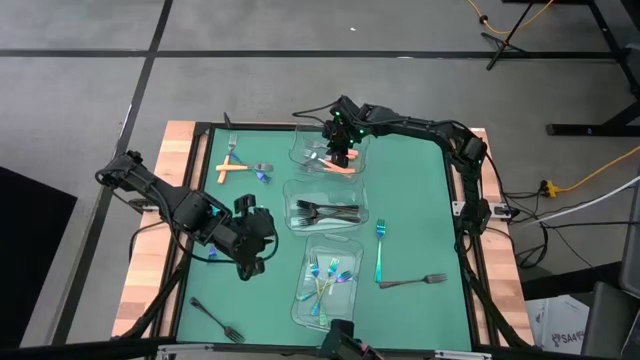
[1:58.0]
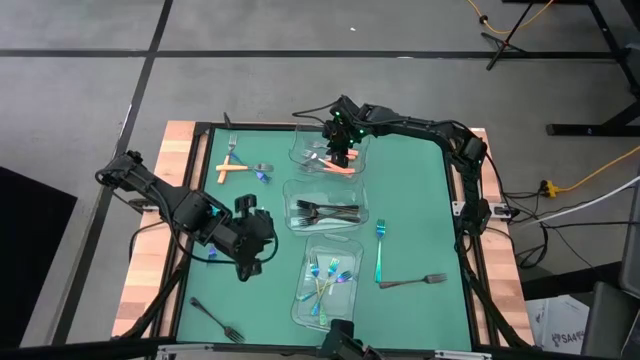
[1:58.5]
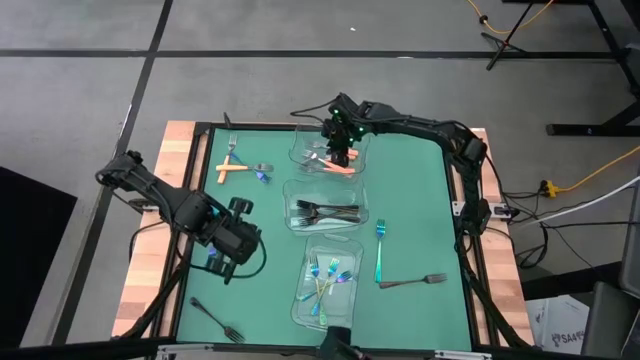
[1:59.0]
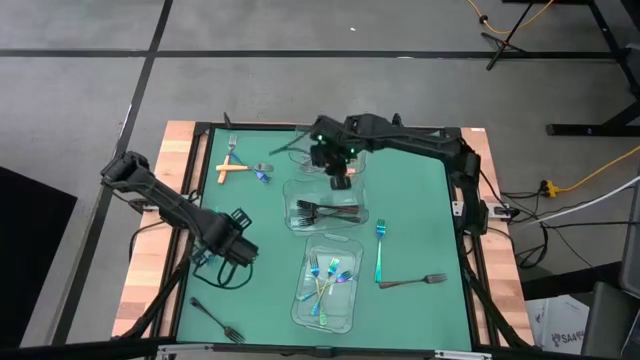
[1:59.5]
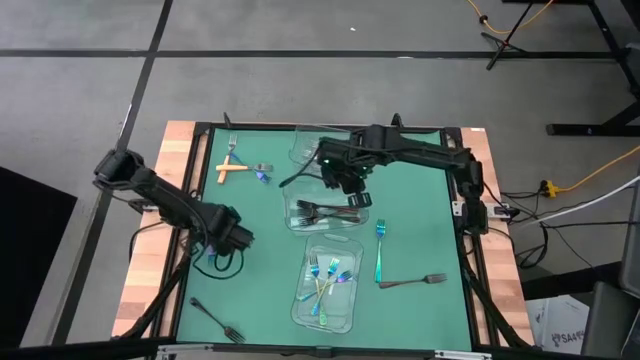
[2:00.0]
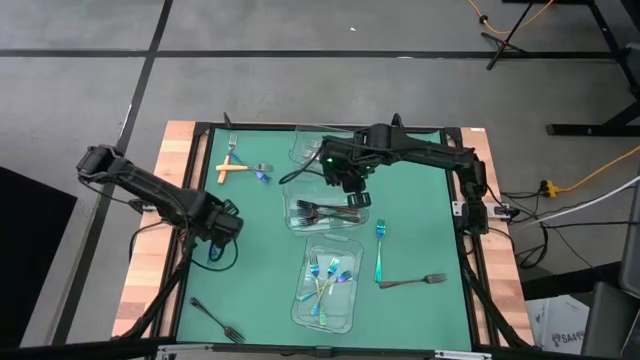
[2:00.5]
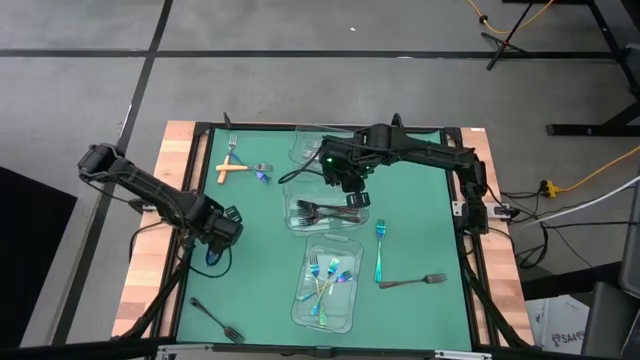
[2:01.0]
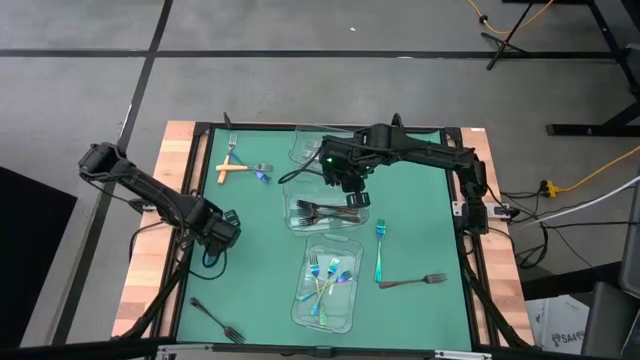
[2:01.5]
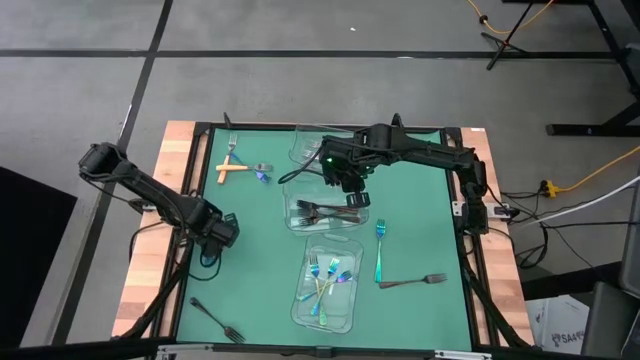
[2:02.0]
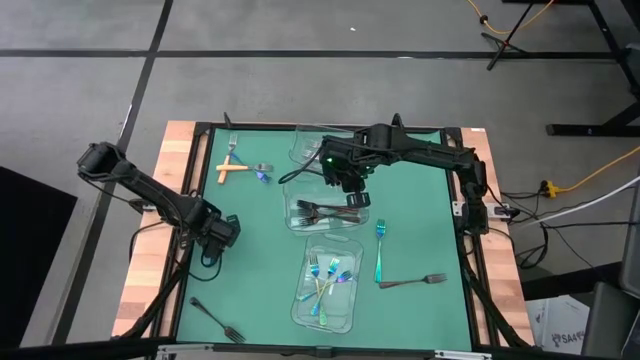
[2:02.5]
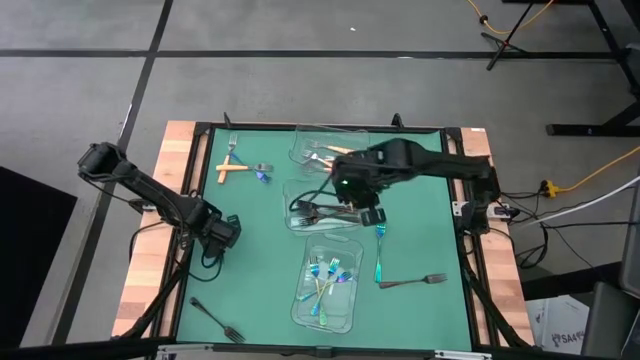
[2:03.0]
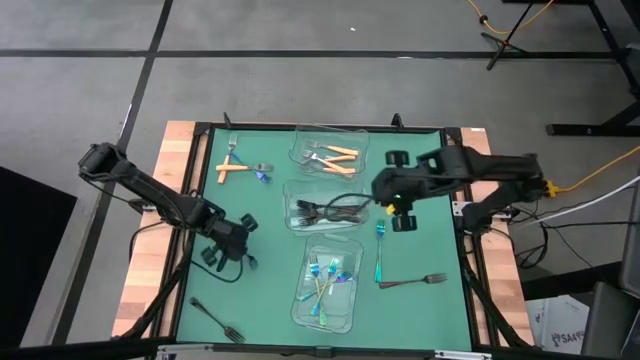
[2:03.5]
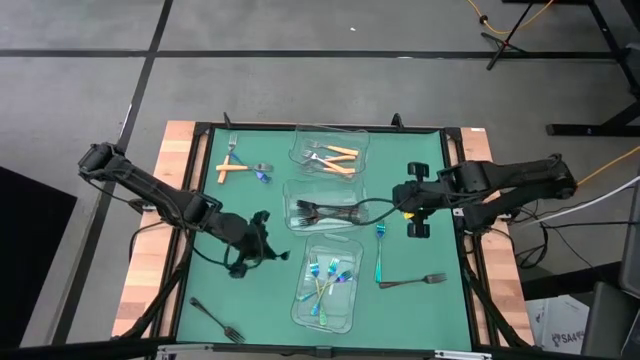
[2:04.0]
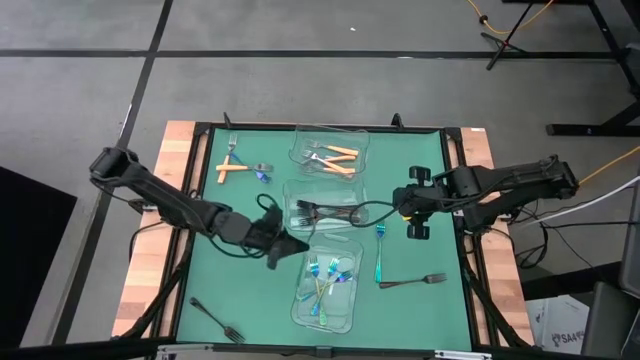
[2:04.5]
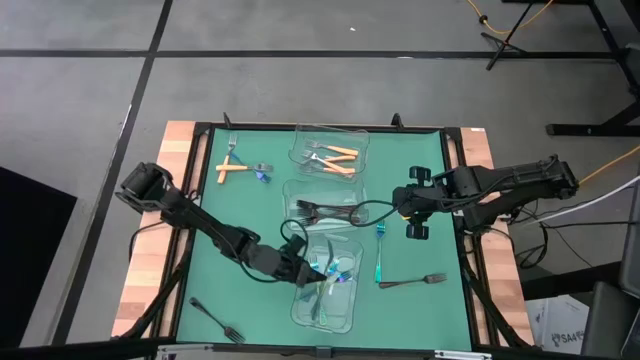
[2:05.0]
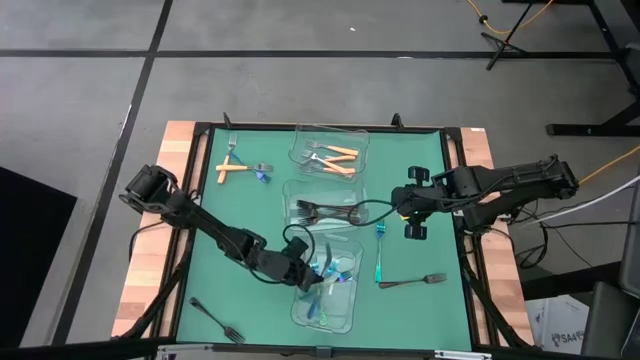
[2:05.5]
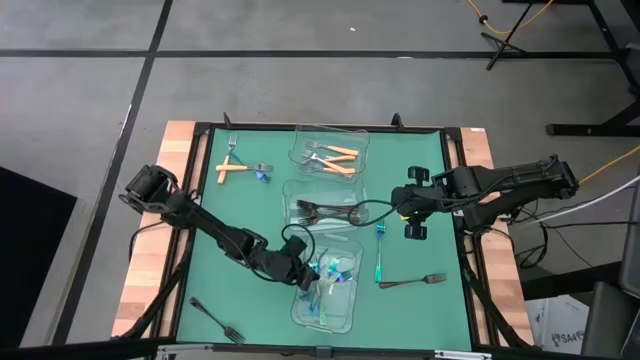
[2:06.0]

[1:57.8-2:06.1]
Task: Sort silverware by color (type)
Put the blue fork into the bottom transparent bin

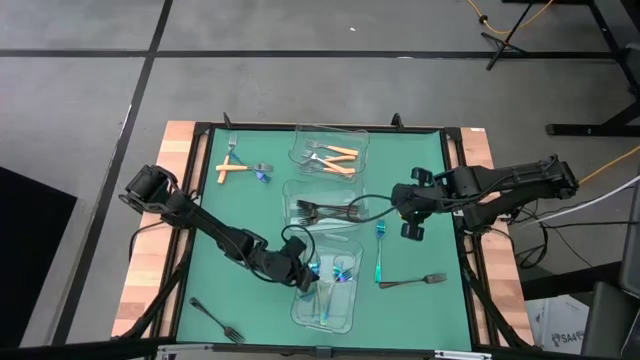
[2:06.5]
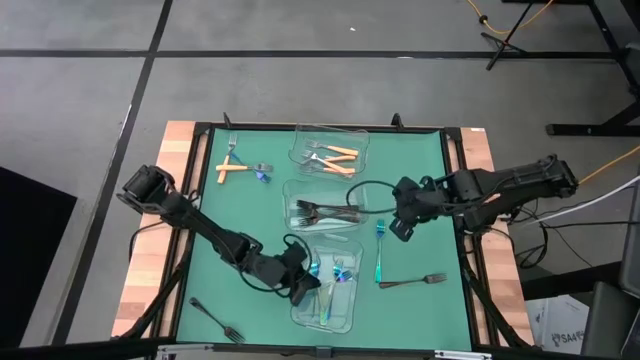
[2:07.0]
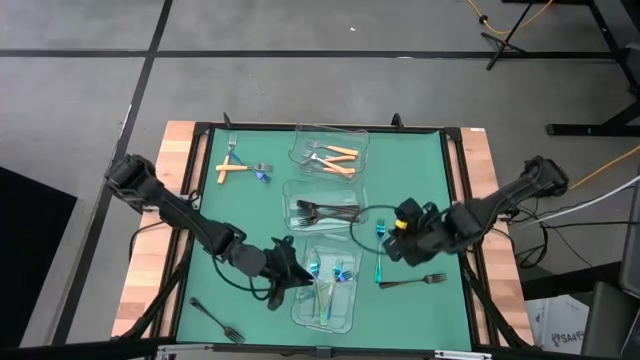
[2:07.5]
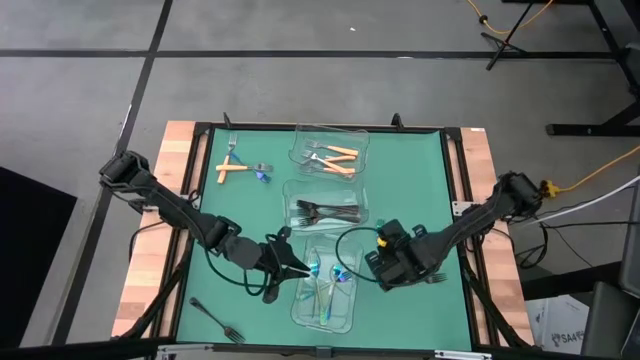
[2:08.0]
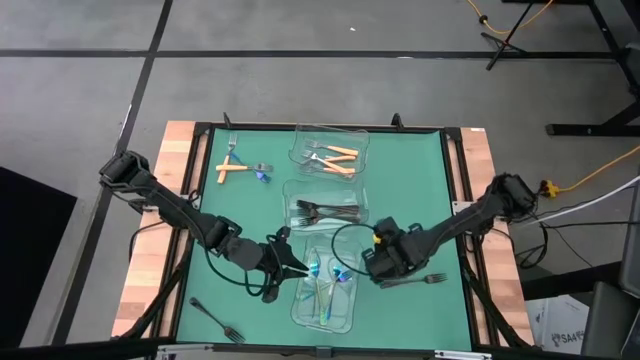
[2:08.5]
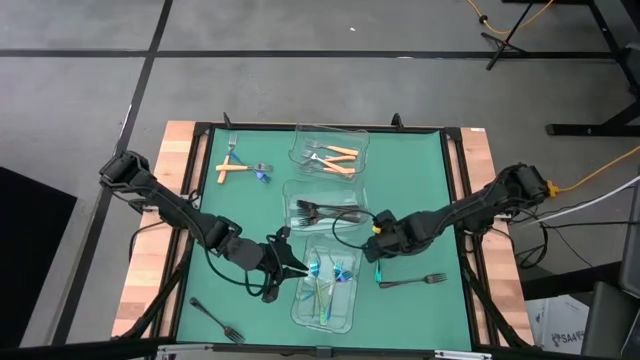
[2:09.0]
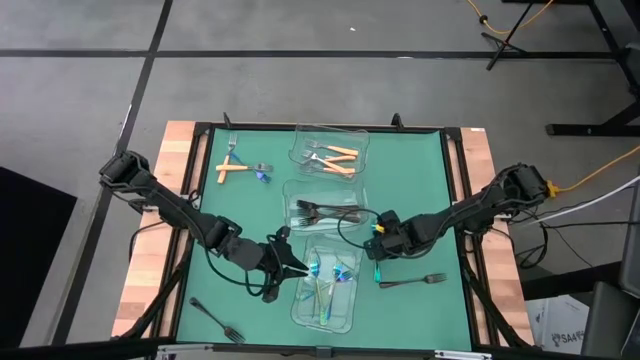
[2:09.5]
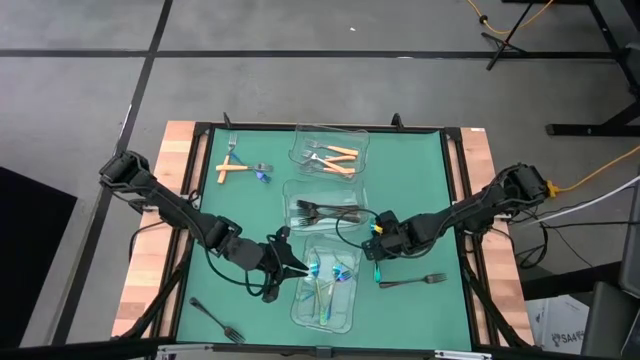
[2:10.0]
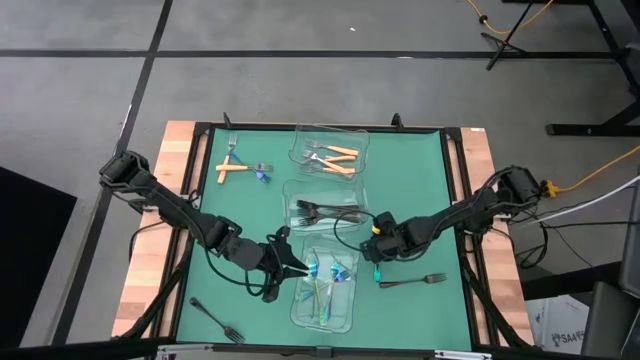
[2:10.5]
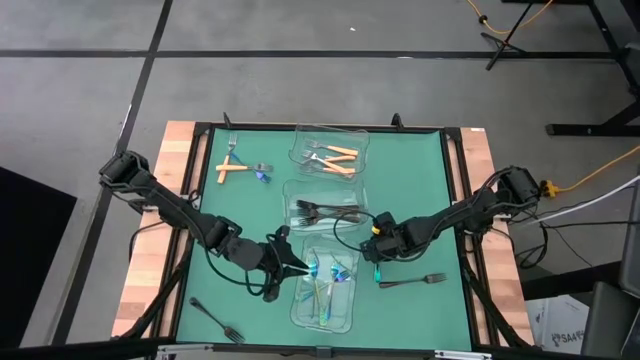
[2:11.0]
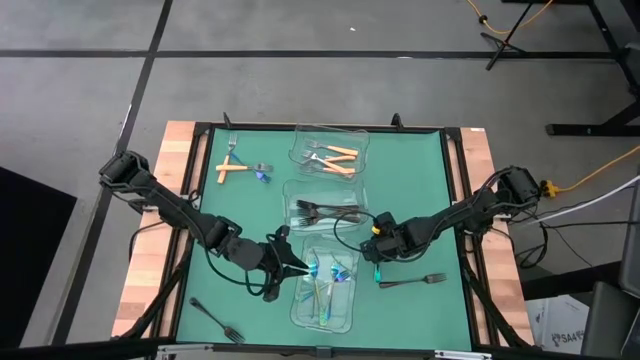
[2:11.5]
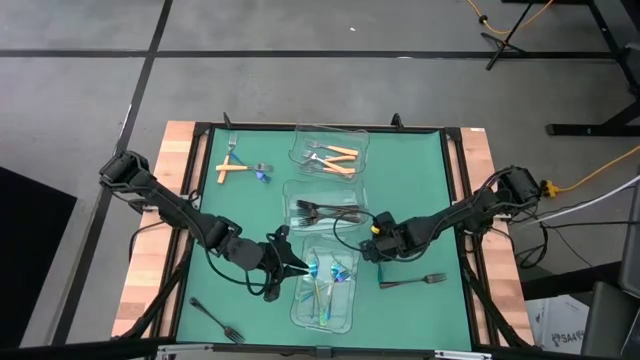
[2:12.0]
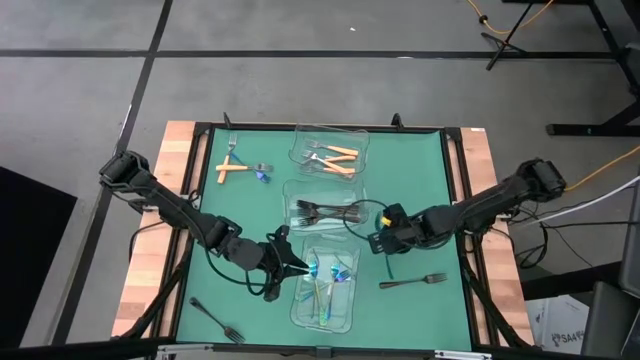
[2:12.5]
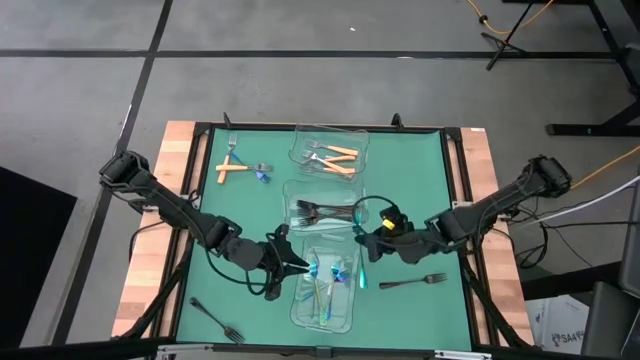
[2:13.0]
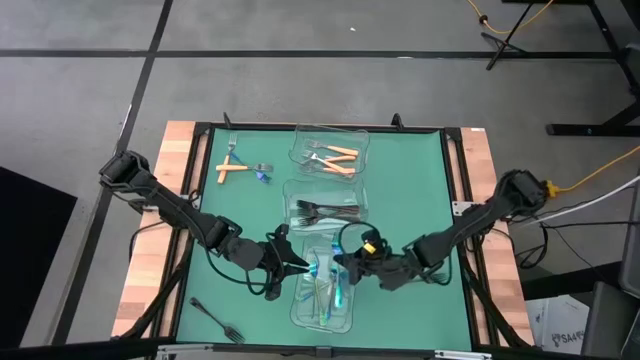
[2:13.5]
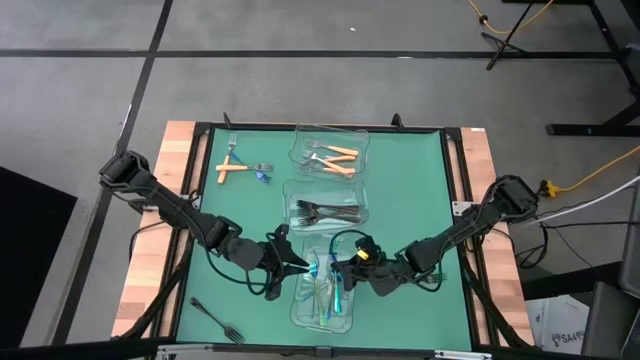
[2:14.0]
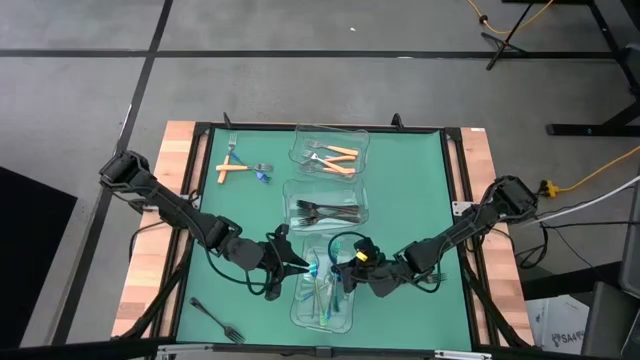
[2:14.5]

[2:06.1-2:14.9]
Put the blue fork into the bottom transparent bin

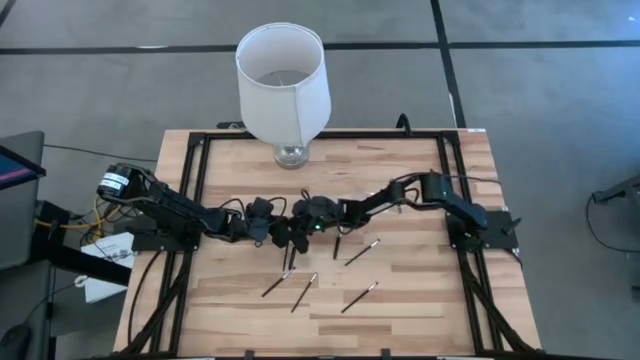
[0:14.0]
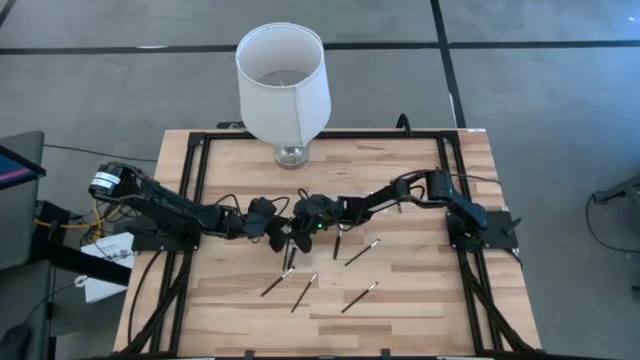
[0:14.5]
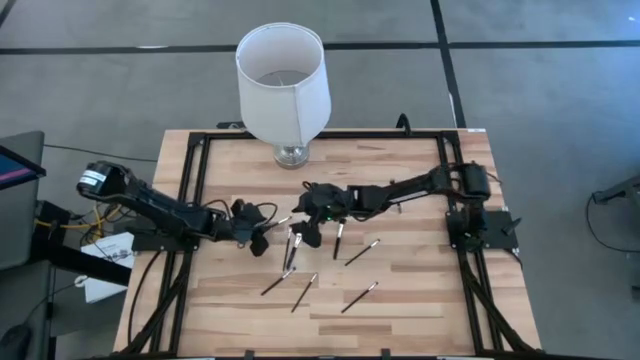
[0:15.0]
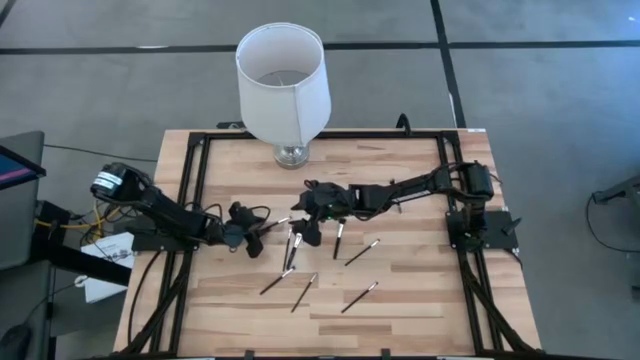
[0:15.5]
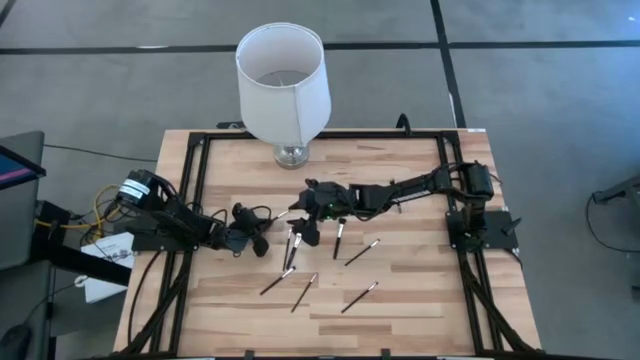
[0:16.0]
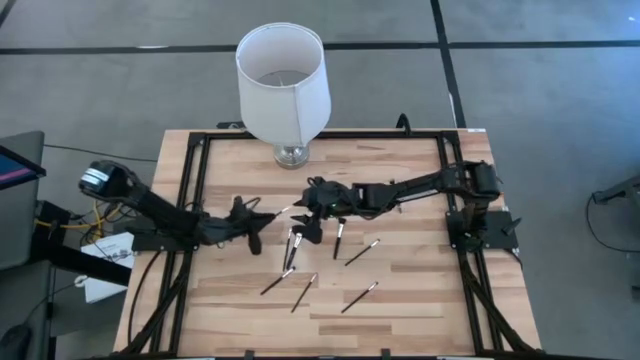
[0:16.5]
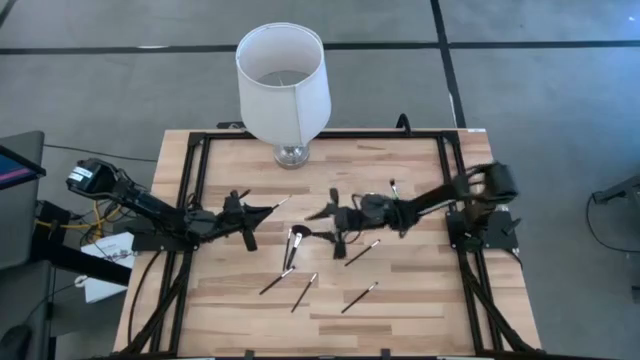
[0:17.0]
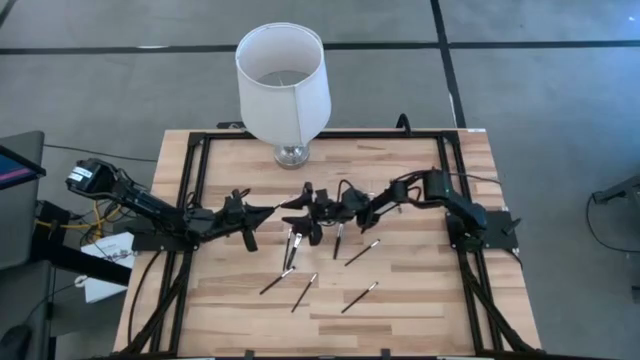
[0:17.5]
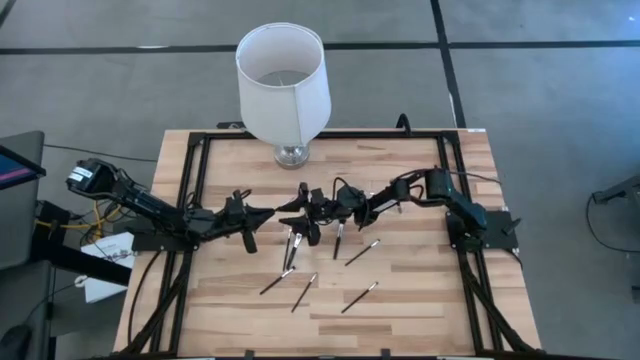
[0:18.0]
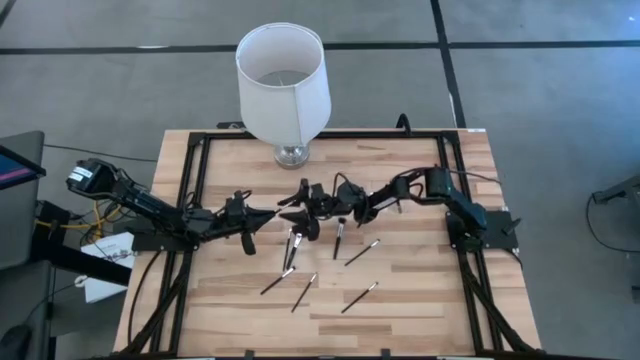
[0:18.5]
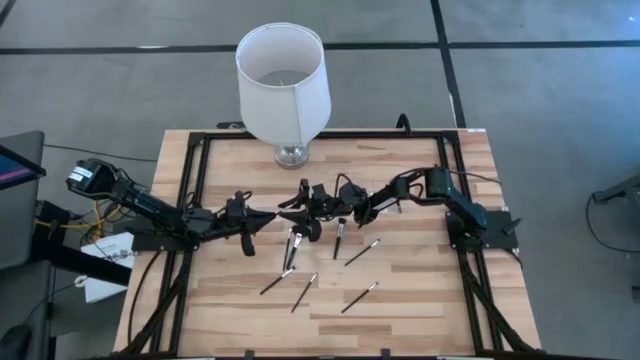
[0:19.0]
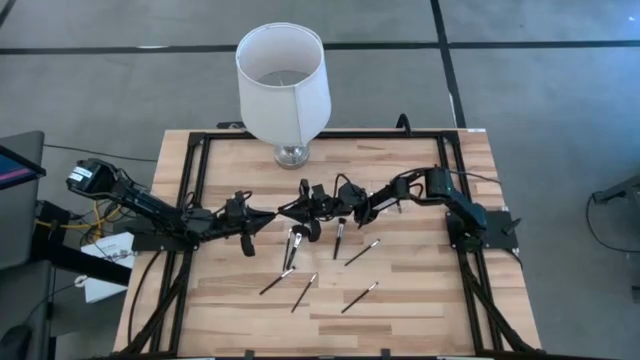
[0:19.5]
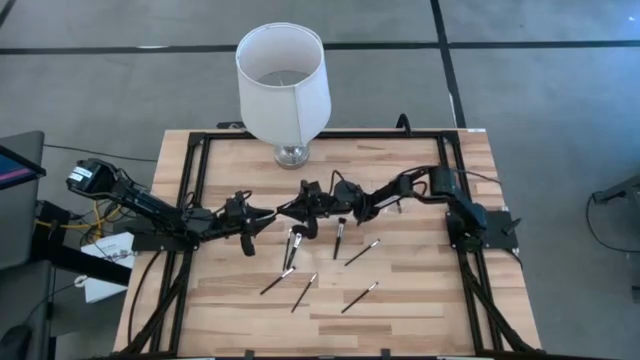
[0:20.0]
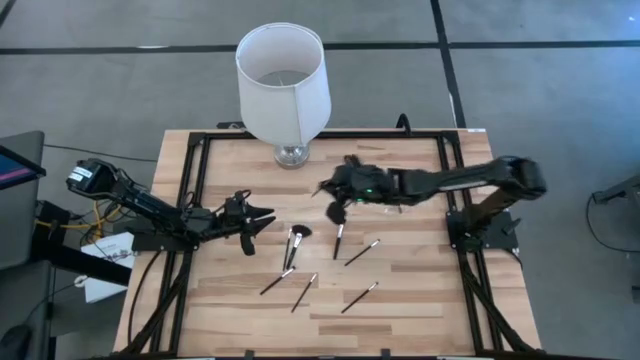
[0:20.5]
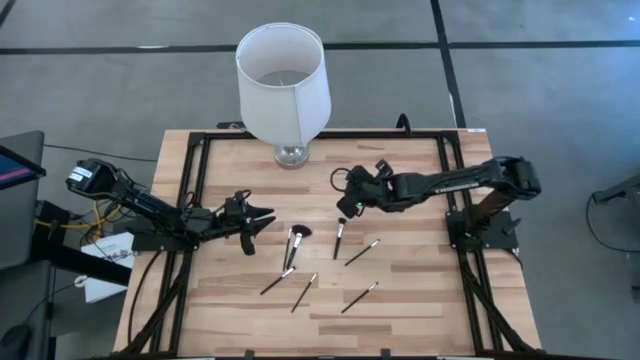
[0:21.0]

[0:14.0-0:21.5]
Task: Pick & Place Makeup Supplies
Put the black makeup brush into the transparent organizer
